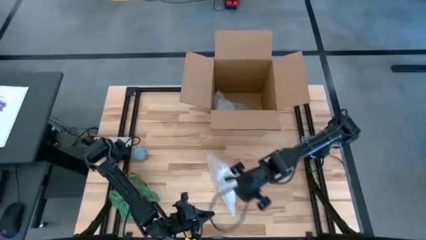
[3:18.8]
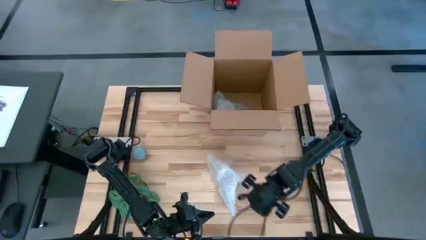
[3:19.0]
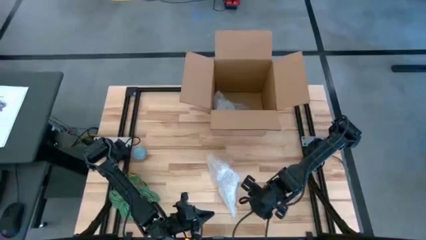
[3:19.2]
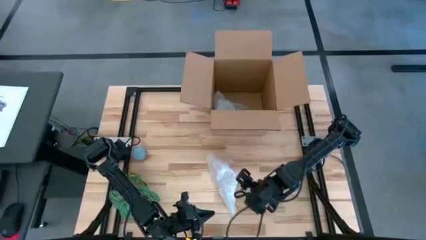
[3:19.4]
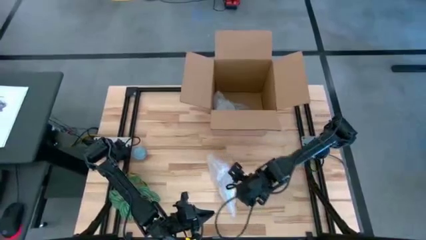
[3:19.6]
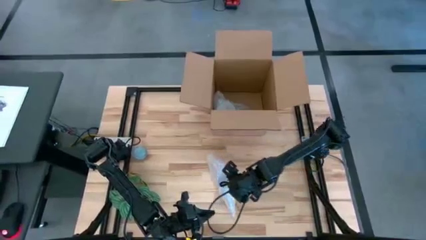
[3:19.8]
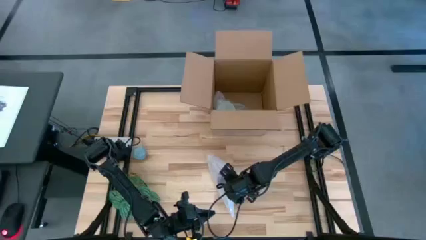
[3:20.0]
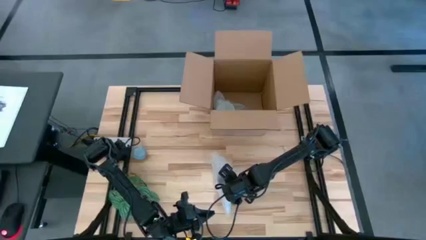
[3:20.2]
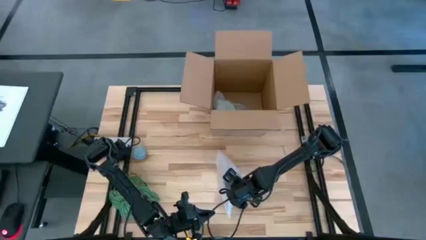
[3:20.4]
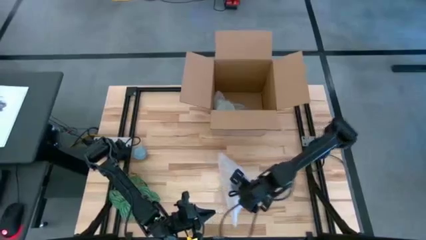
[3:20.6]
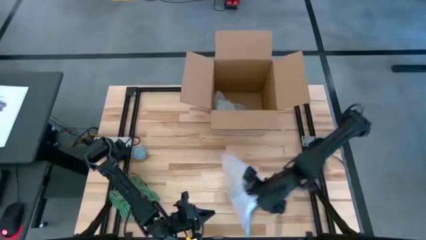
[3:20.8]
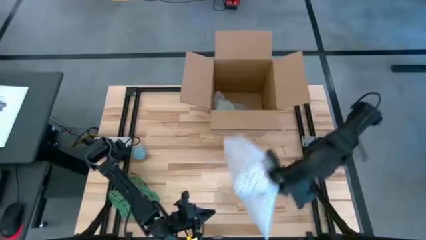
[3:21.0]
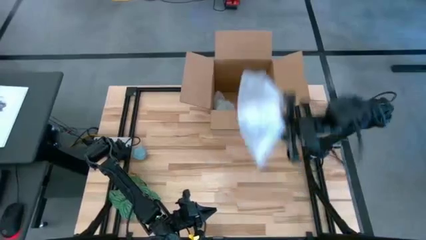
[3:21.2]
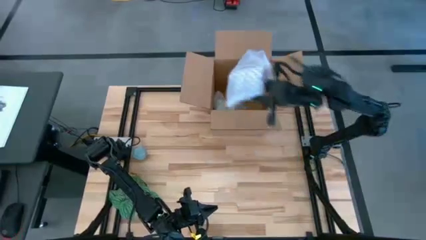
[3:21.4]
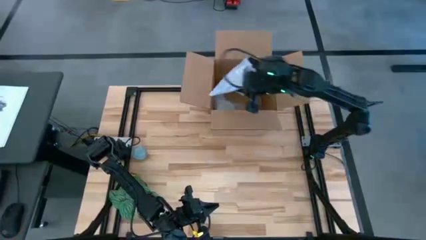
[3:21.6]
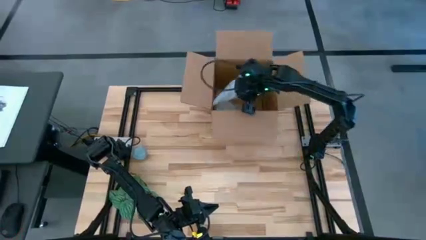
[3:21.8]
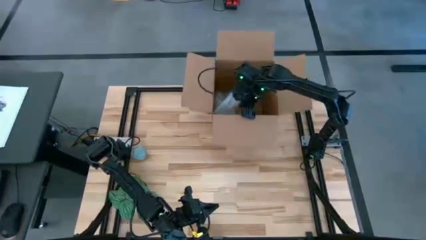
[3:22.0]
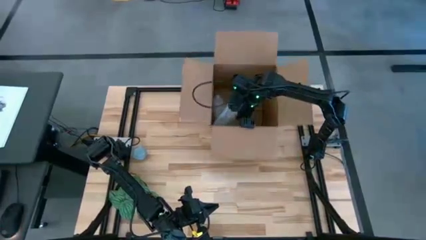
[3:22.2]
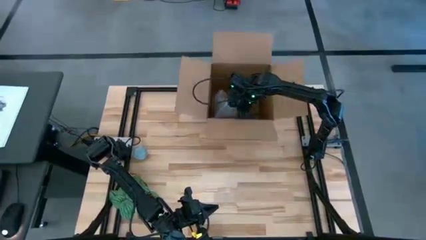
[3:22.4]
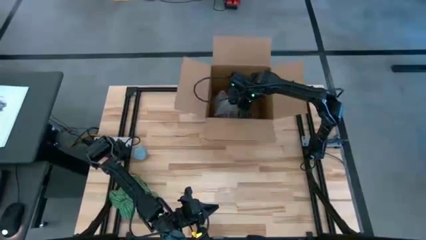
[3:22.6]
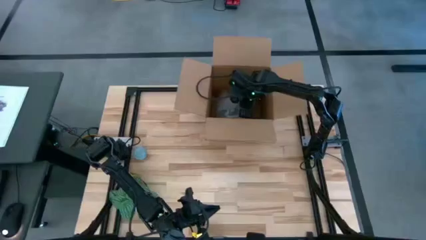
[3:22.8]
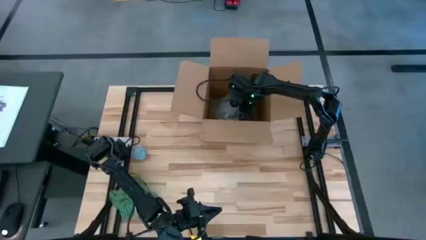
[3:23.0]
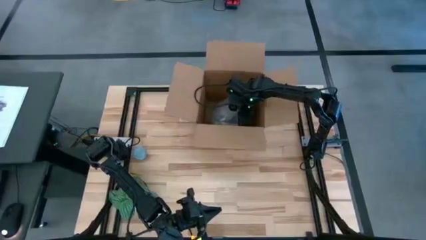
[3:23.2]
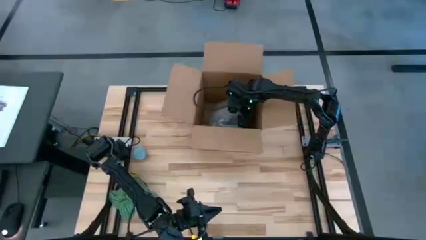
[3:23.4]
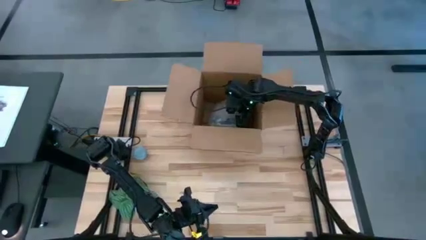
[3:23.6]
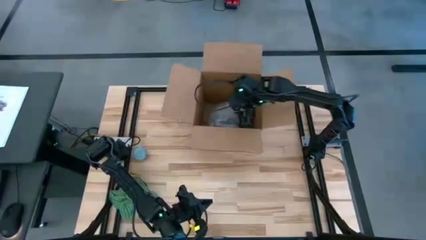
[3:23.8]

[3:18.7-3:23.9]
Task: wrap mug
Put the white gray wrapped mug into the cardboard box

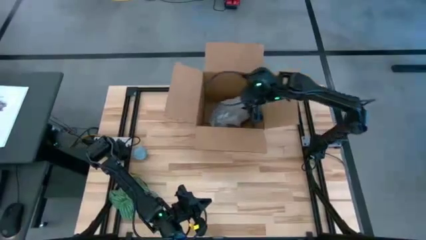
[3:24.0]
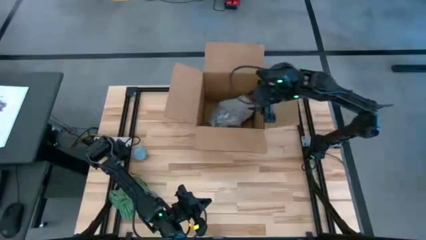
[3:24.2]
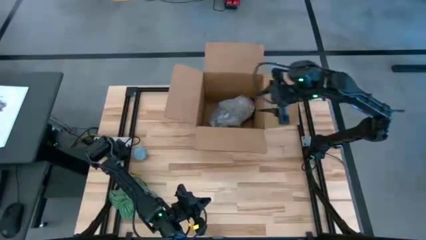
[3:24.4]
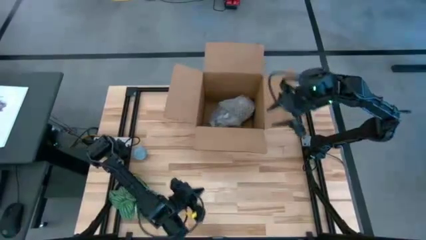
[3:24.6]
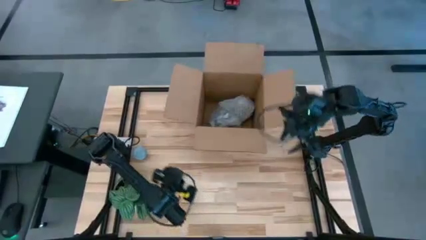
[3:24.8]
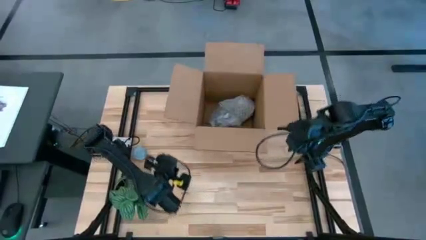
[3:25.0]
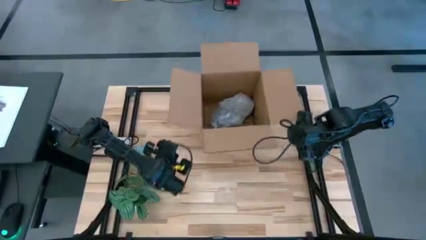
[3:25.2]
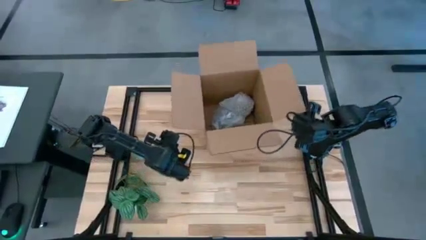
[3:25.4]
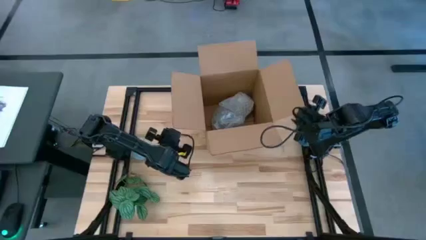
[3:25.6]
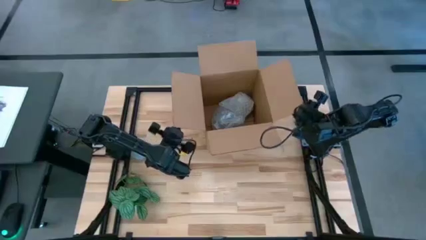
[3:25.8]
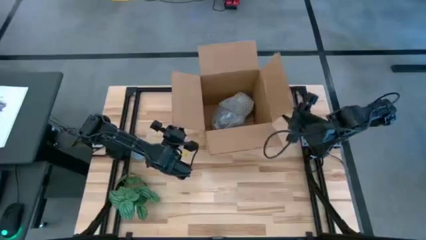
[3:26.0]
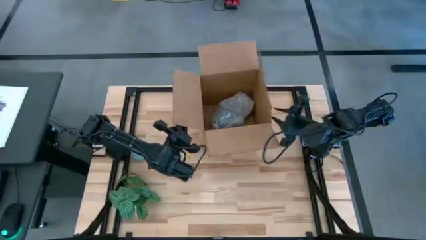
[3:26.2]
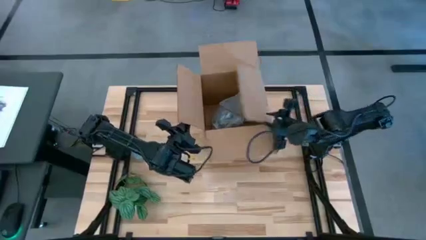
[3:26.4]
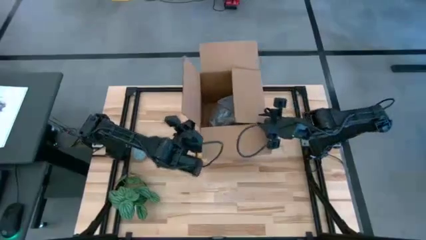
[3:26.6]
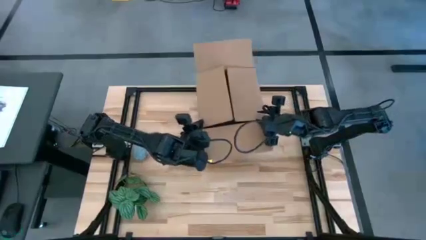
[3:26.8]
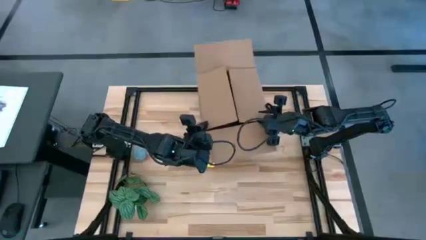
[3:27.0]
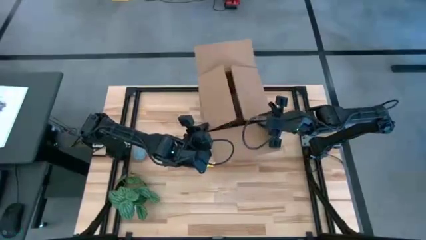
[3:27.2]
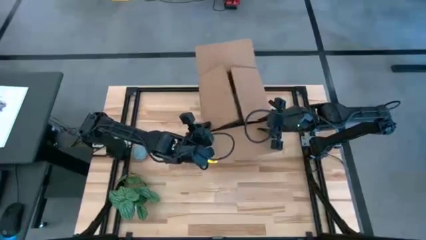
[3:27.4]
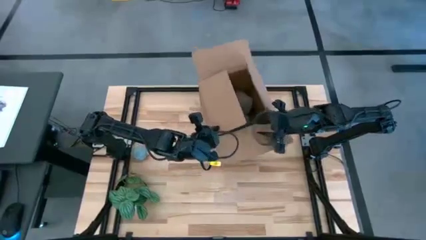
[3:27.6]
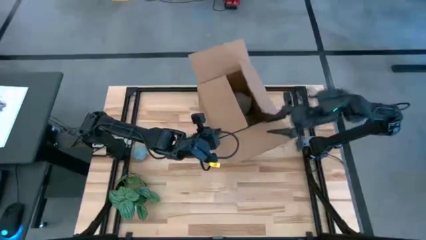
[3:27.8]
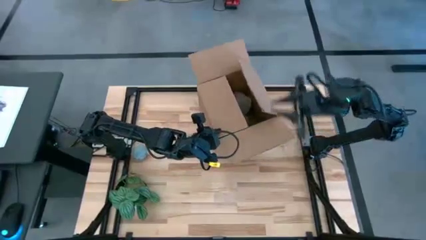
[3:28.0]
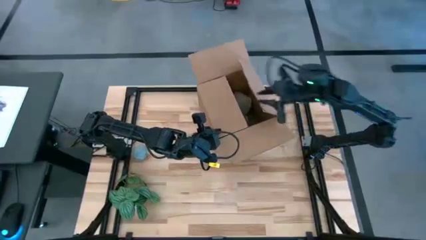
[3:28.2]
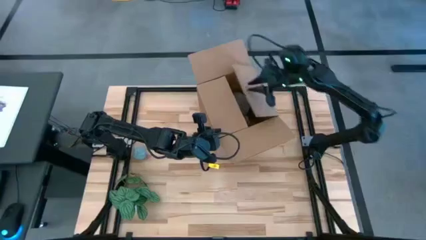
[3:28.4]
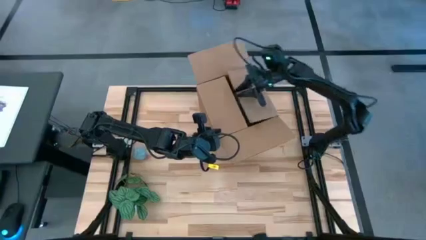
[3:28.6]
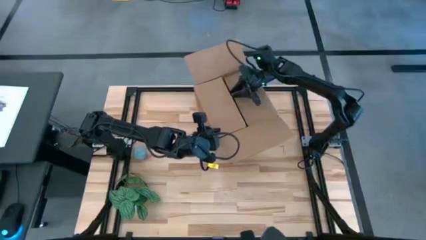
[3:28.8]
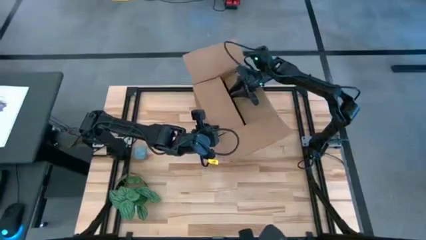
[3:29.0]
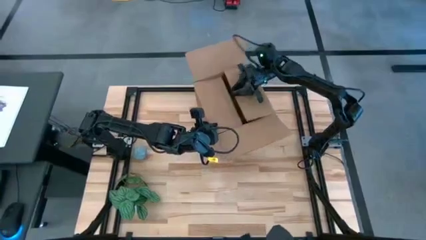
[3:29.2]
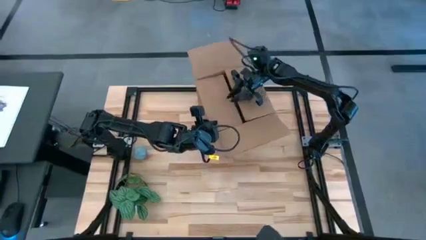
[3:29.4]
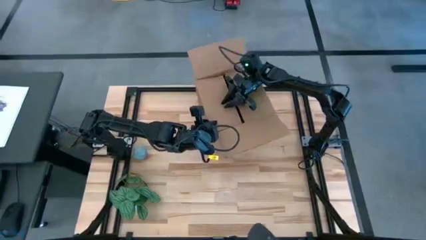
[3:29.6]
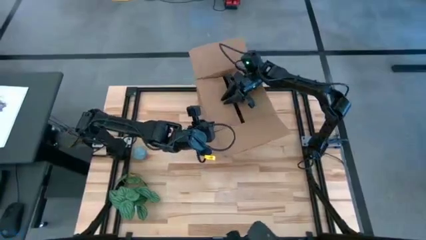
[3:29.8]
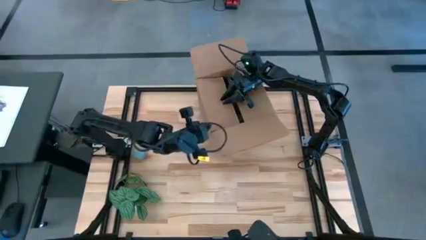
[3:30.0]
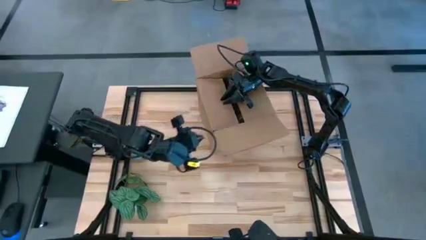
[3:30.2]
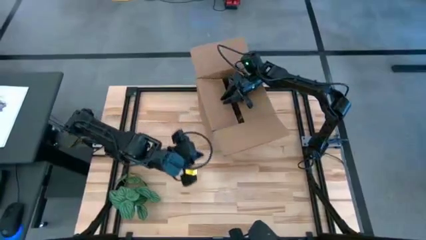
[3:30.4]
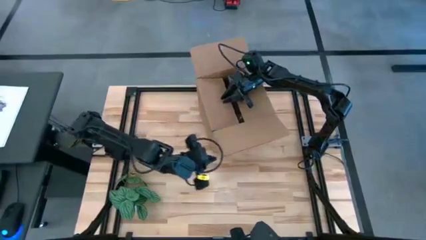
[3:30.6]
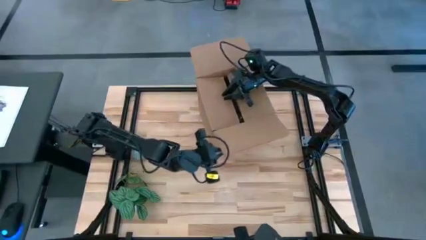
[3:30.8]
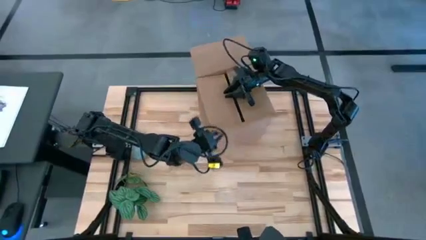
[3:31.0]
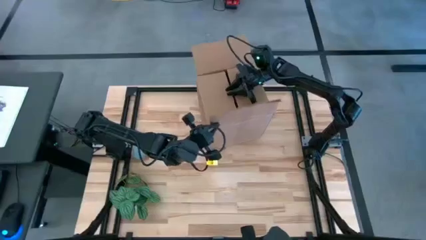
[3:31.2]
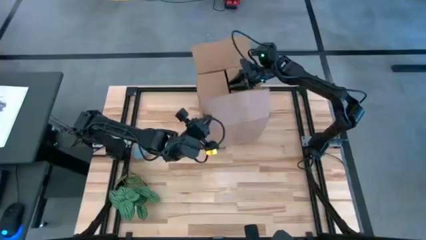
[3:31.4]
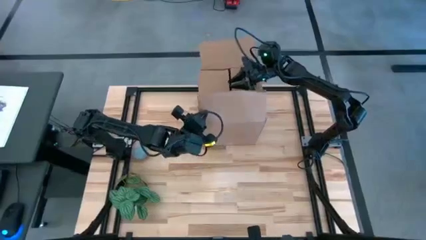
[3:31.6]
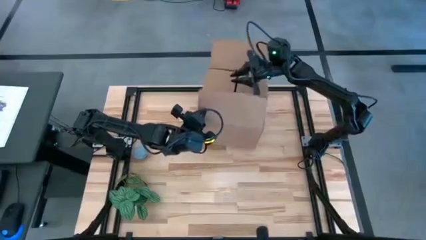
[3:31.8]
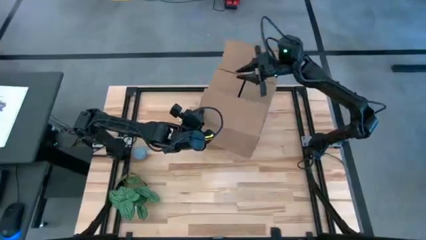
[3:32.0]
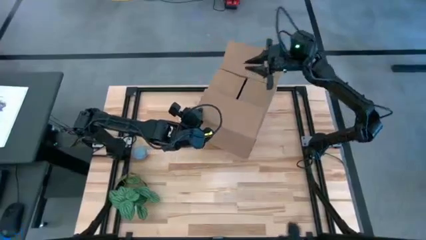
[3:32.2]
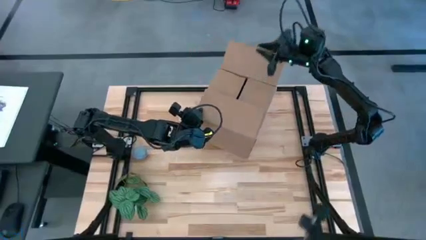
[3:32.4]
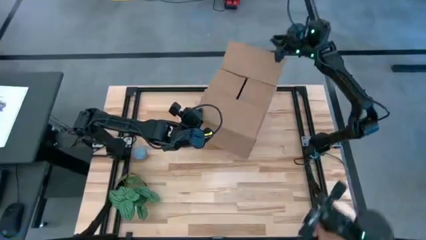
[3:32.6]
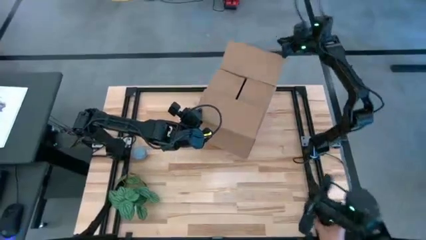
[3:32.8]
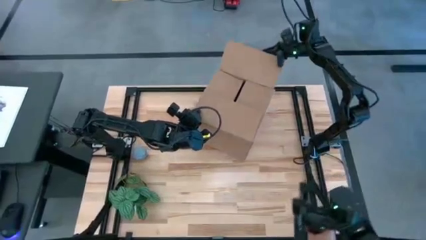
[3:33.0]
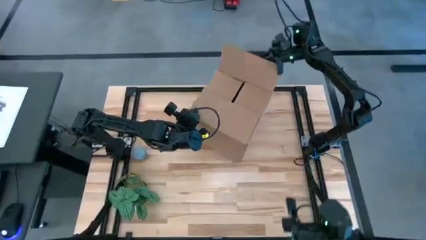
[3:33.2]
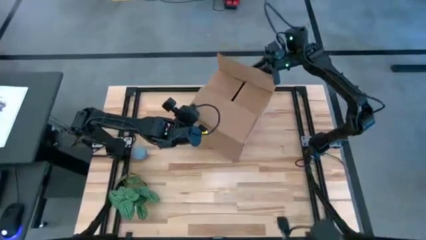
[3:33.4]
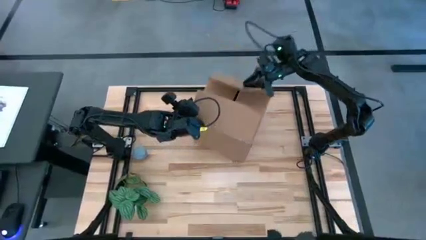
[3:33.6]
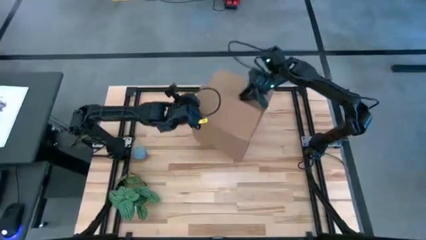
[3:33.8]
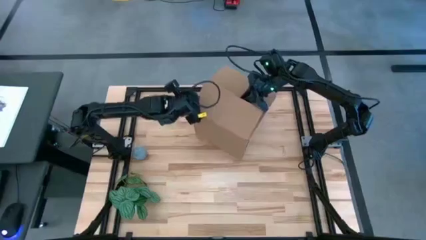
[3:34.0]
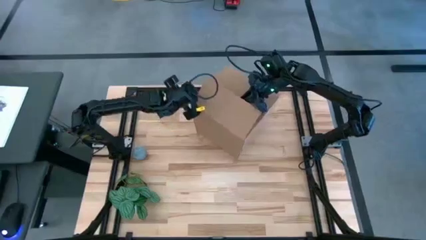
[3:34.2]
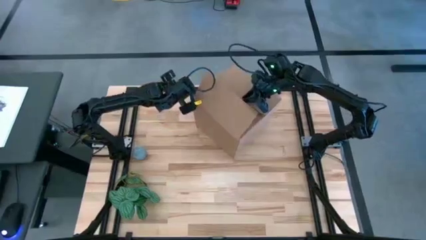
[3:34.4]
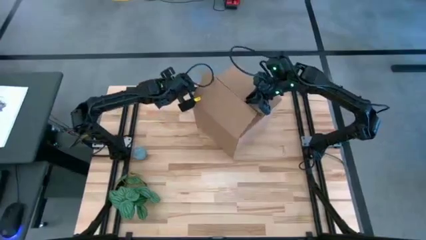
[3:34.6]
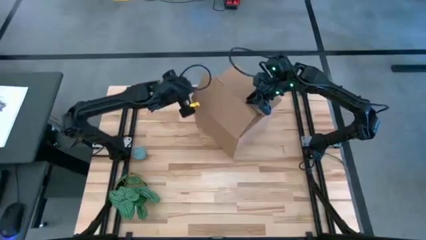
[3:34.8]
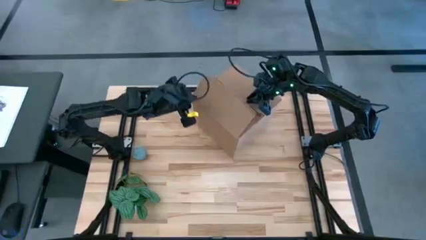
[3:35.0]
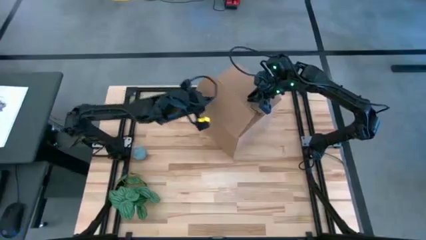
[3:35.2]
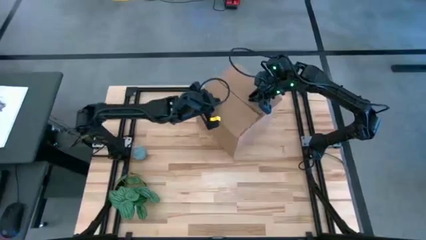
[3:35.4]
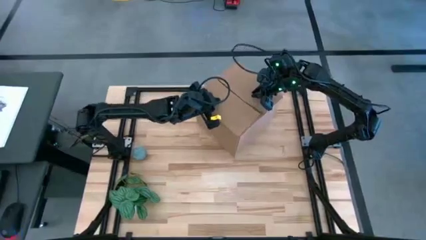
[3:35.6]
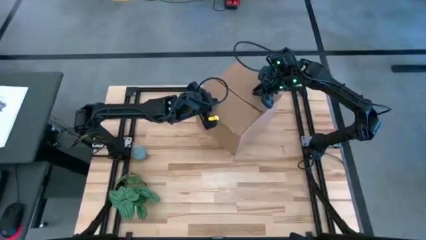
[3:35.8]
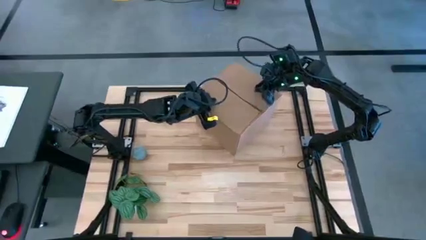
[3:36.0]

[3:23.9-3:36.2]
Close the cardboard box
